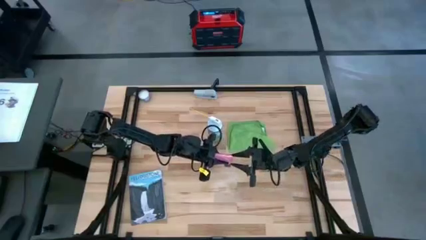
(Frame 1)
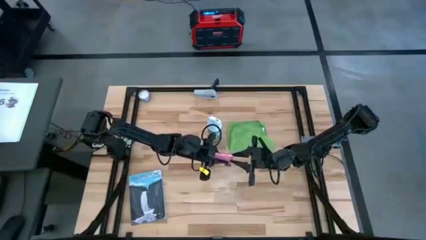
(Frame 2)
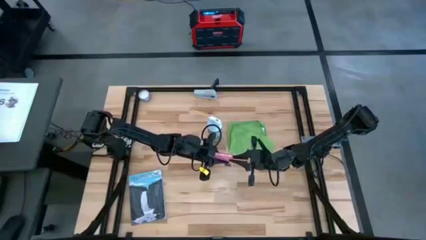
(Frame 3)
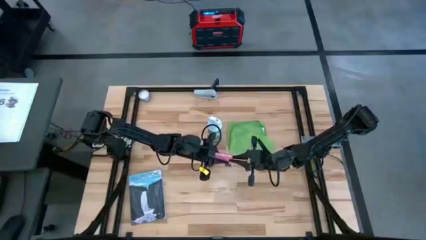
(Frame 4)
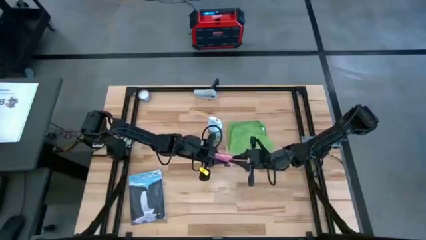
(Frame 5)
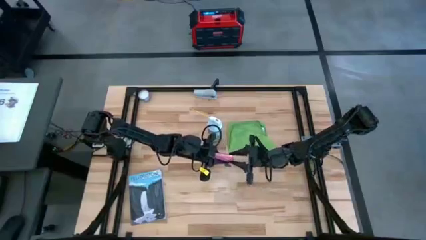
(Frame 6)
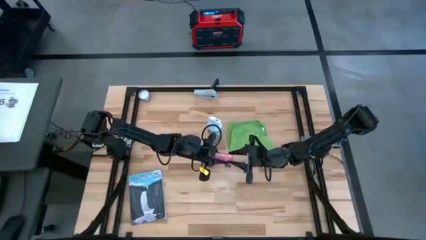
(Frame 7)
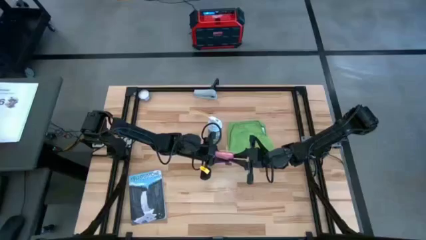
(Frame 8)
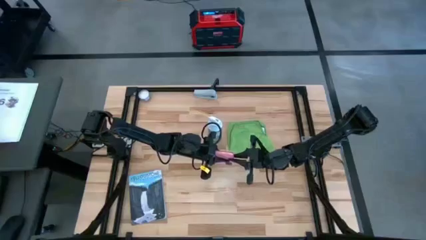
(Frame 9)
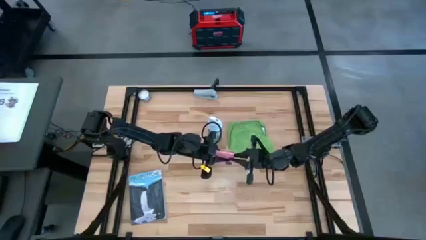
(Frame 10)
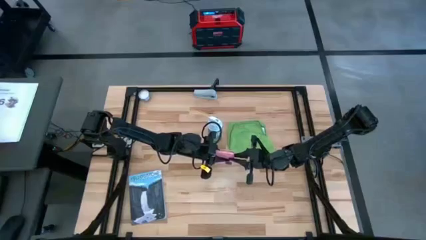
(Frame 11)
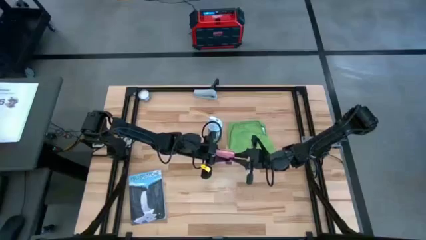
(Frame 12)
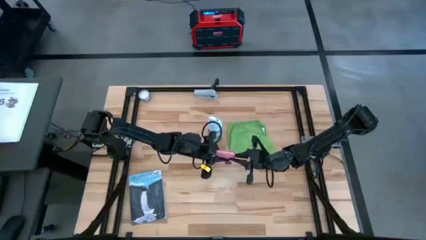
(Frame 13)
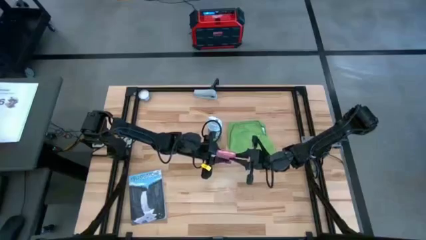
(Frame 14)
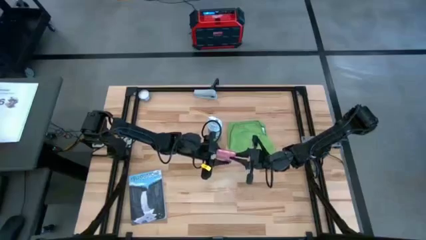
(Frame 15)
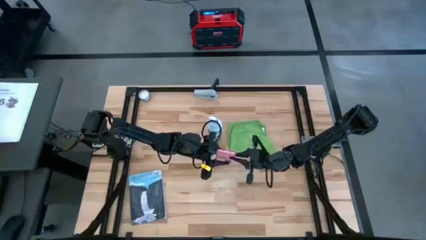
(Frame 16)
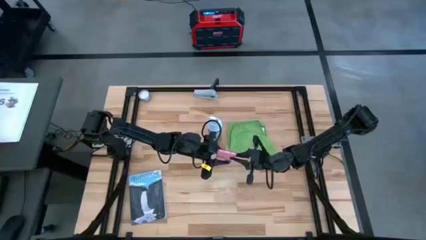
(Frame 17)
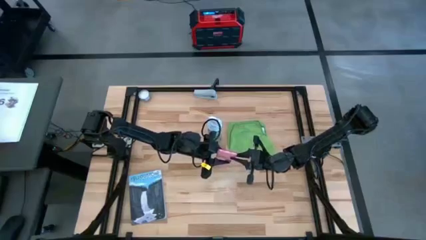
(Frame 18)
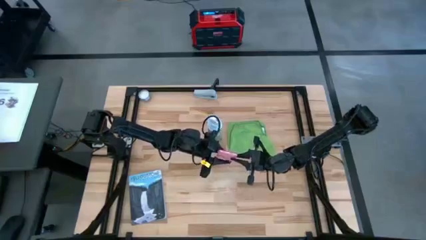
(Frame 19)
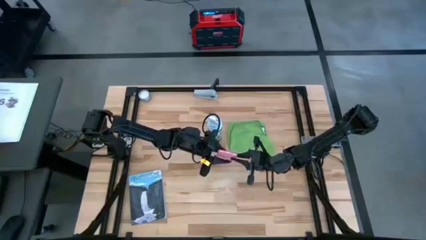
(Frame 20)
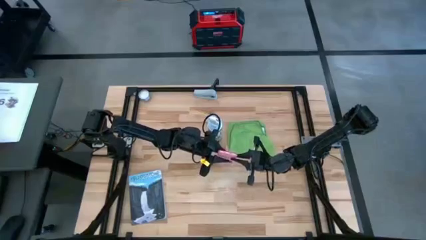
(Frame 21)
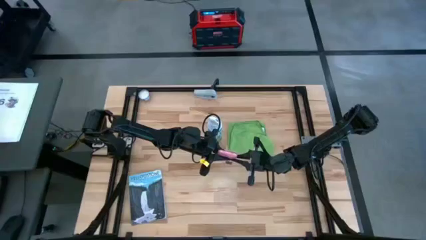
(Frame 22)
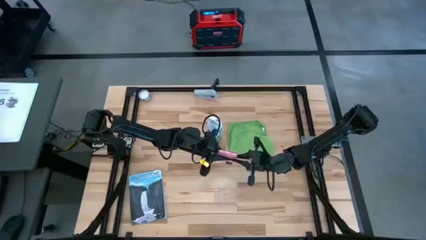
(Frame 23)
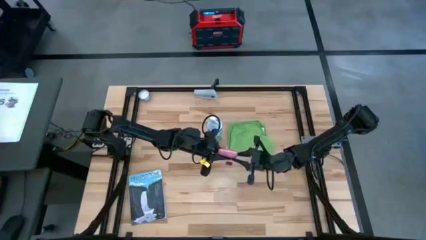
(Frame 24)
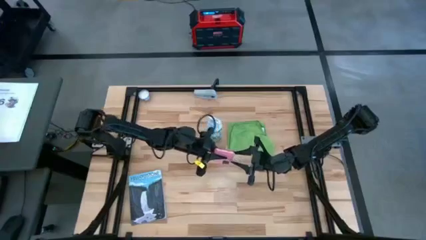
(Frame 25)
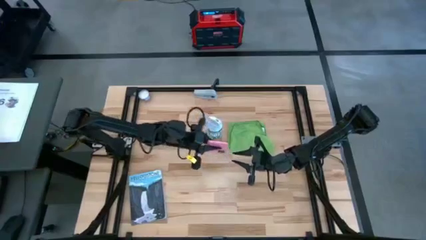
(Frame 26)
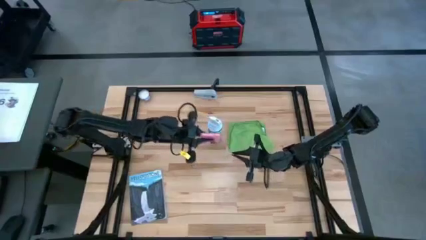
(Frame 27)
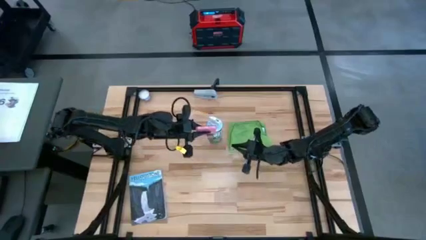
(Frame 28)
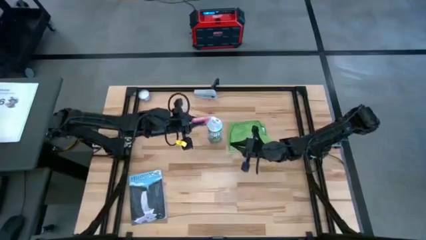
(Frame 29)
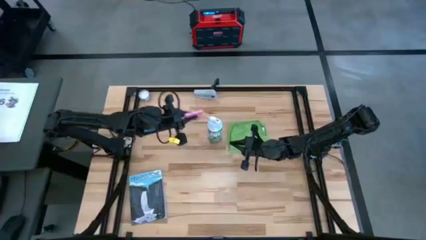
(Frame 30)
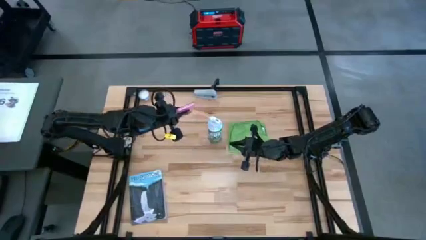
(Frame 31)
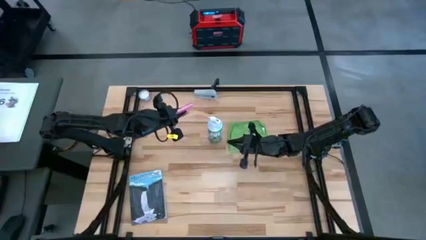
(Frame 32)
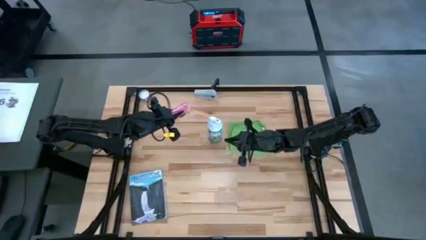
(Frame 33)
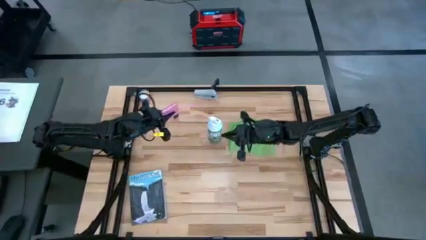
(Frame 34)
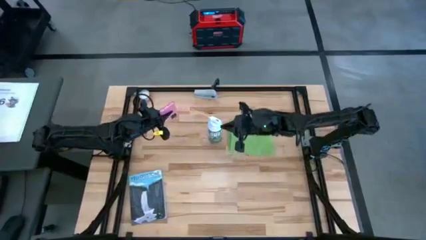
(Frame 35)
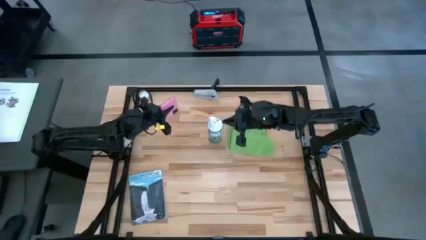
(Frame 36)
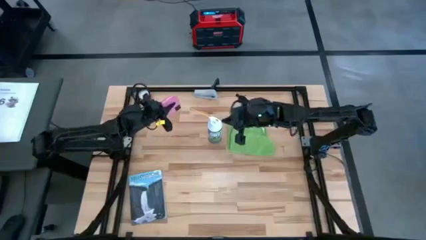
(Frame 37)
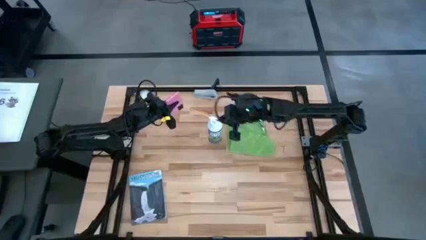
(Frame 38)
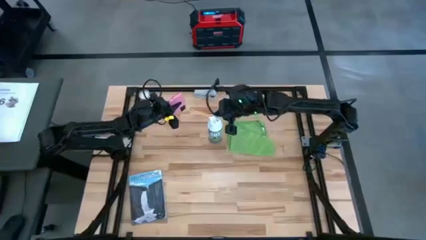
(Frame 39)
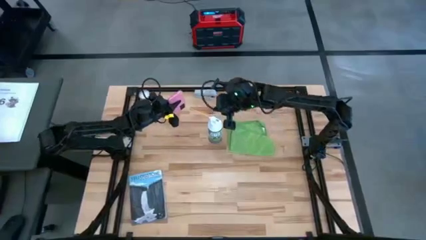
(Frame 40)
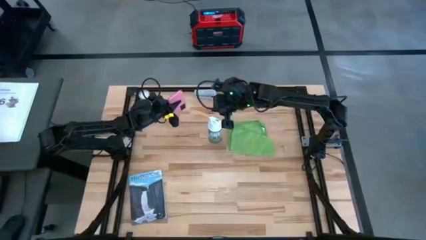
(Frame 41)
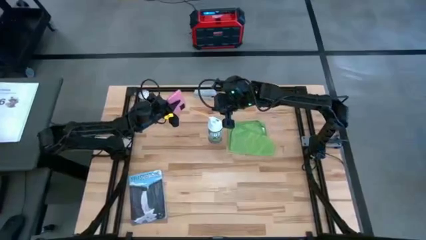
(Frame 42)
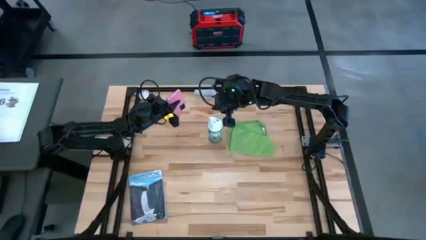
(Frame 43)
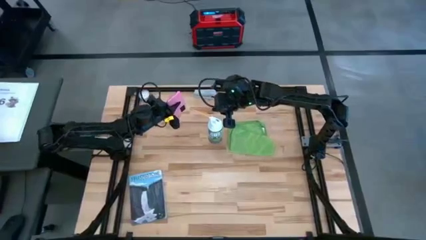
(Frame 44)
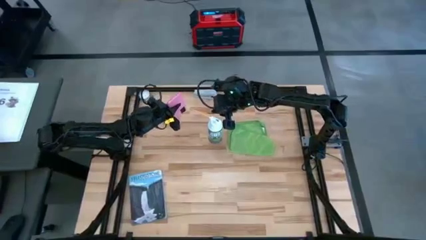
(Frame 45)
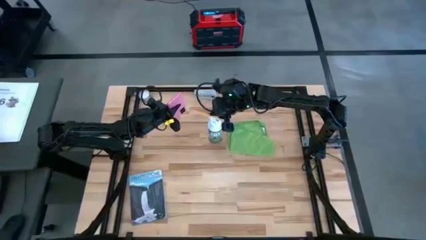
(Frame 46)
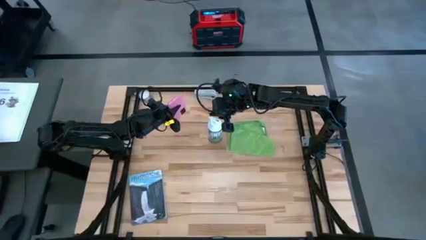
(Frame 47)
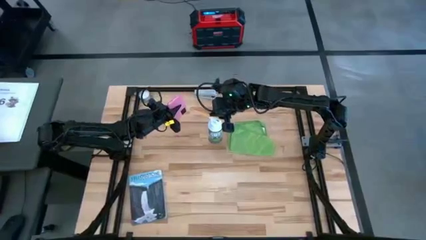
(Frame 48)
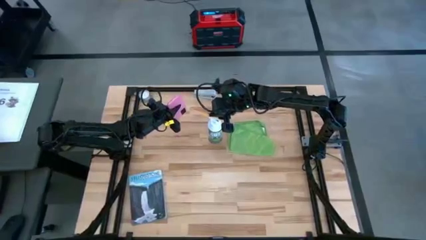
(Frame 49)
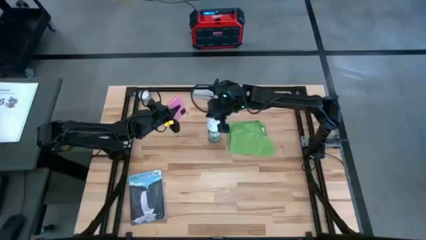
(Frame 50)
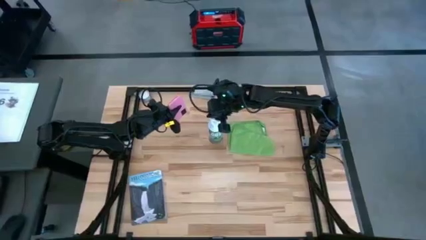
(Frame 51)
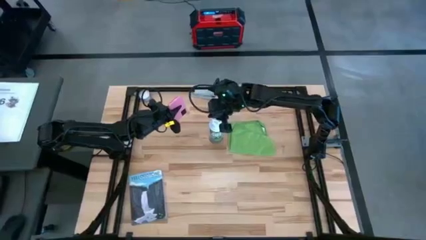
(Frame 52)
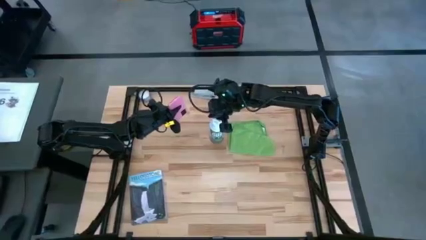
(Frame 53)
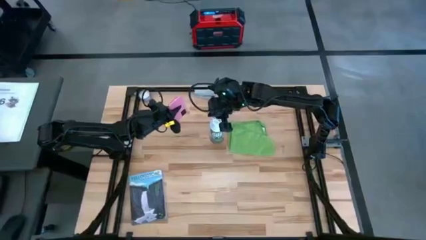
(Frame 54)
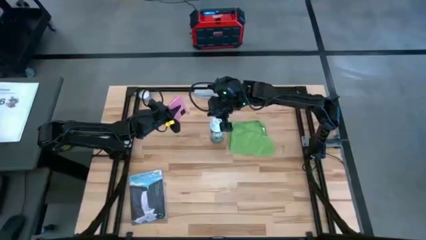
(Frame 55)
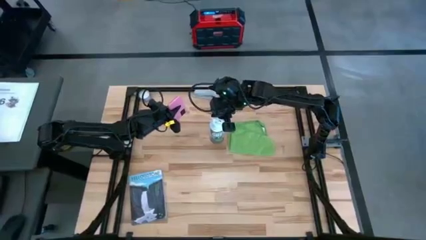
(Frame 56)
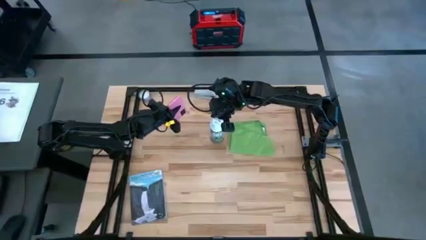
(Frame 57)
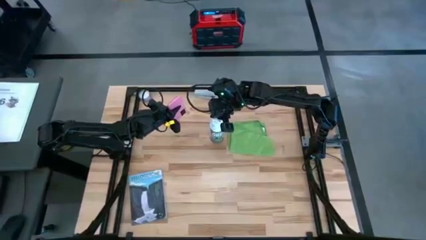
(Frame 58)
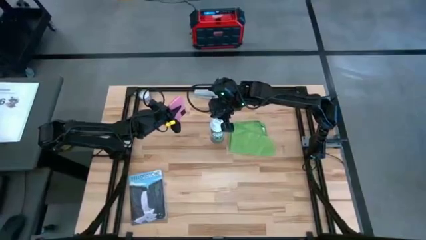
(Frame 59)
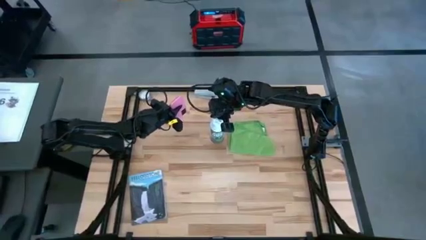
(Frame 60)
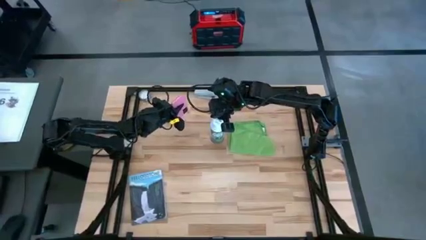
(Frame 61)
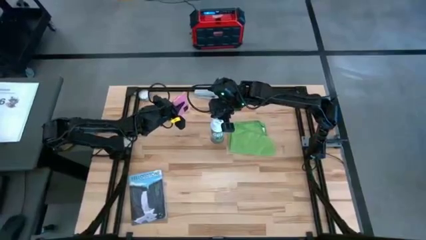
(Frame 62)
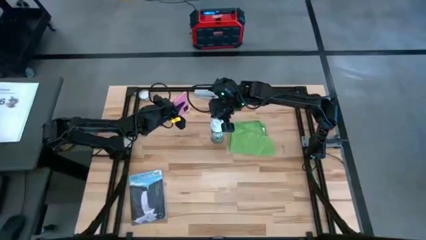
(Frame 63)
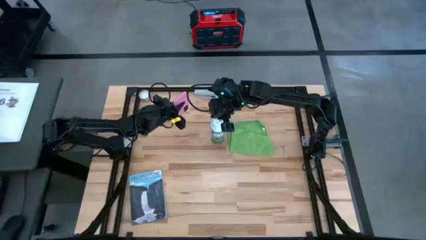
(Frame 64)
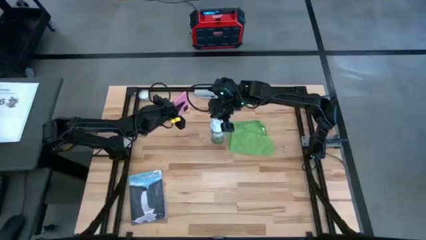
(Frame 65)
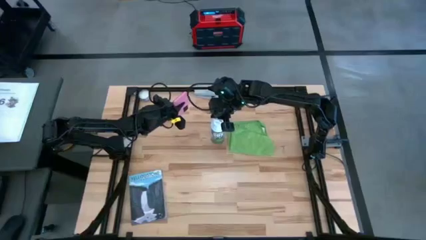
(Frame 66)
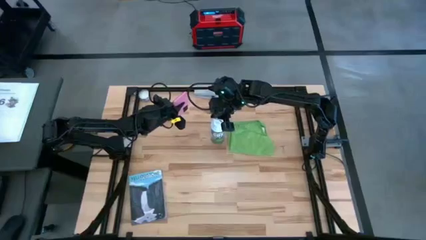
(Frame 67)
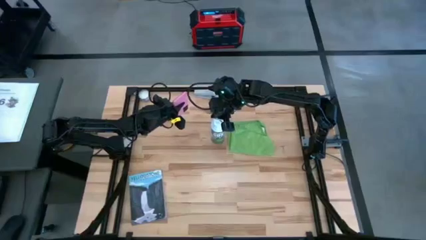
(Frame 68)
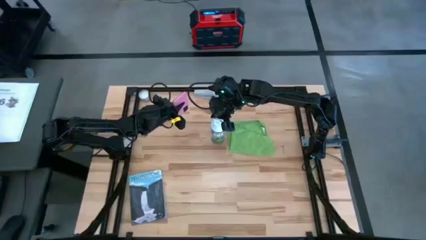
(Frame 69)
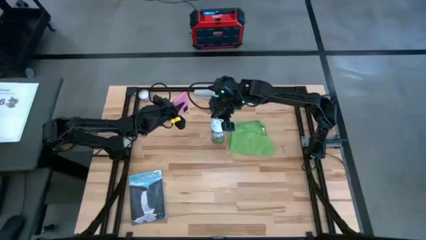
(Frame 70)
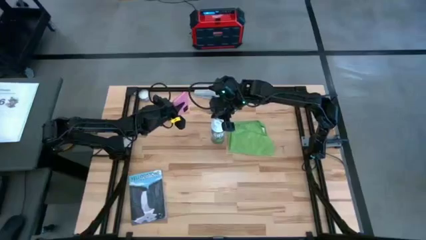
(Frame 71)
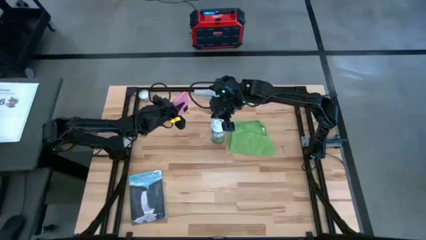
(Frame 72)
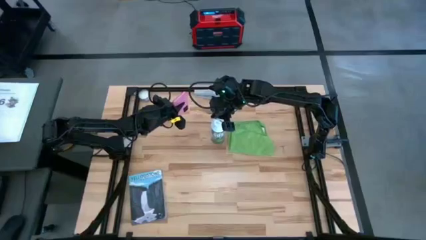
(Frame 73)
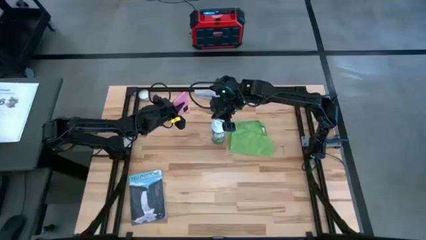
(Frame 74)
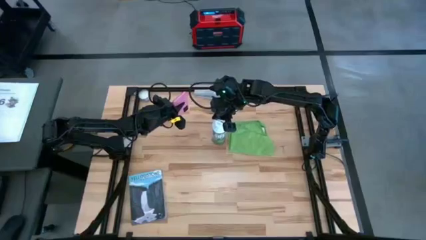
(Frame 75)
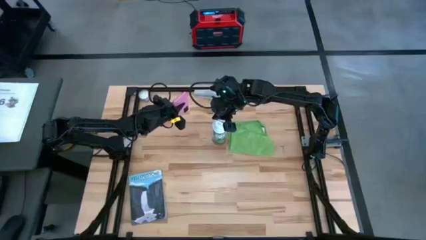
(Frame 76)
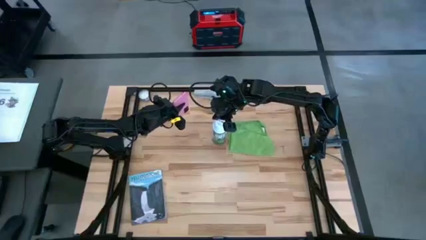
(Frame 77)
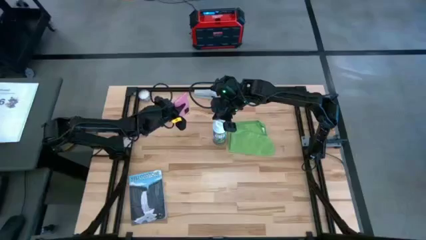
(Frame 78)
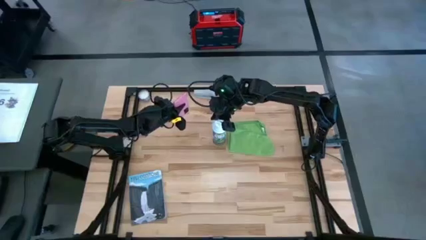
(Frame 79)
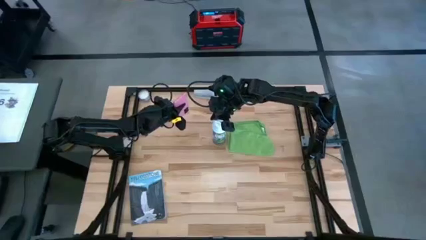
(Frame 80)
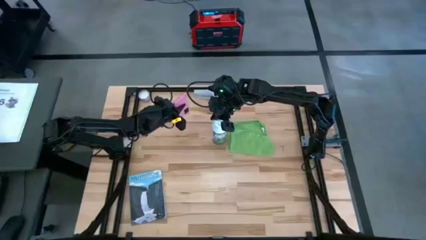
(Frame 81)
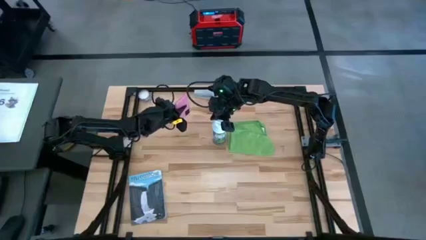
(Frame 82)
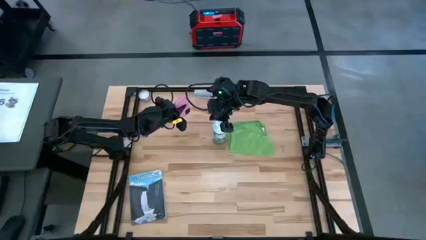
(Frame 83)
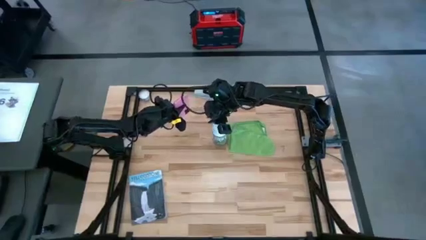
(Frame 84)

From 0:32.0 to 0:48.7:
Task: Apply microfiber cloth
Spray the pink cellphone using the spray bottle
